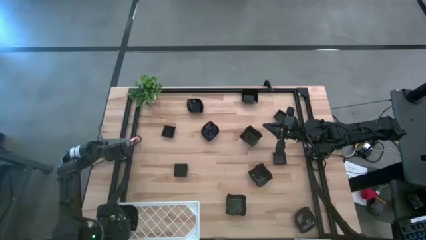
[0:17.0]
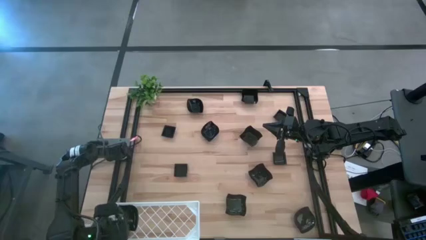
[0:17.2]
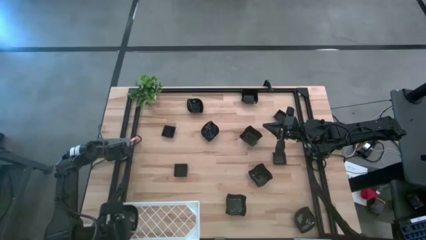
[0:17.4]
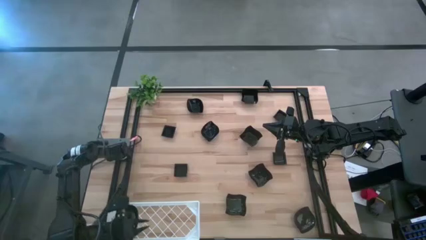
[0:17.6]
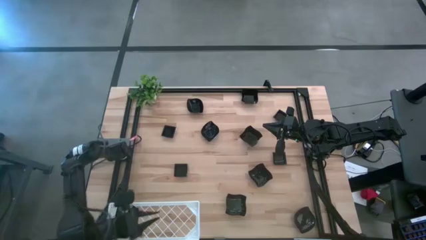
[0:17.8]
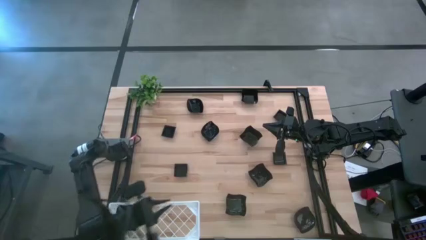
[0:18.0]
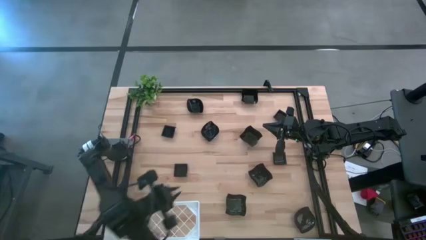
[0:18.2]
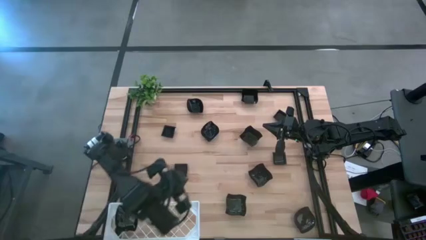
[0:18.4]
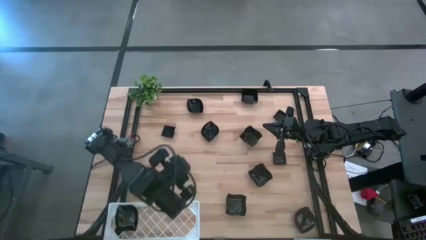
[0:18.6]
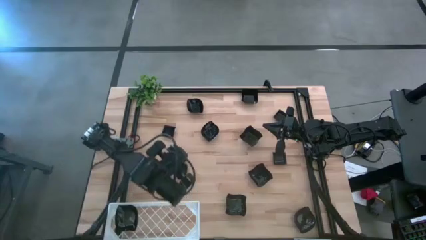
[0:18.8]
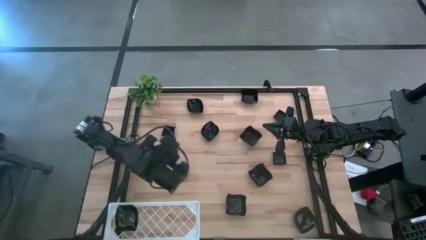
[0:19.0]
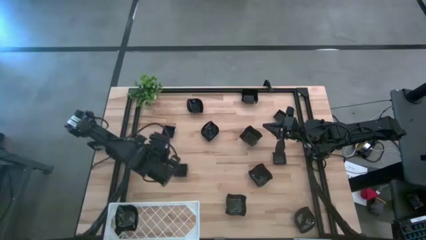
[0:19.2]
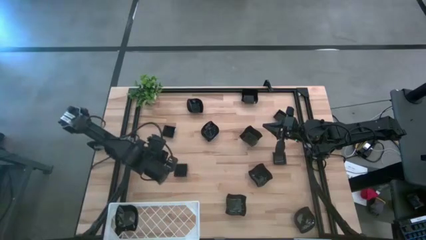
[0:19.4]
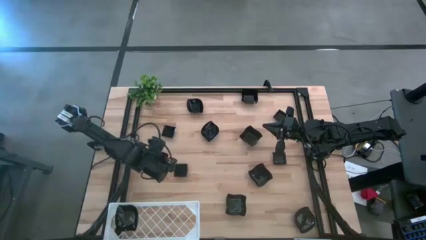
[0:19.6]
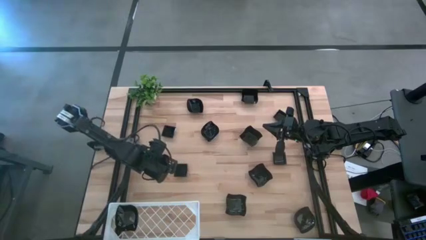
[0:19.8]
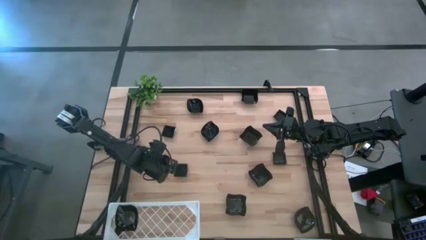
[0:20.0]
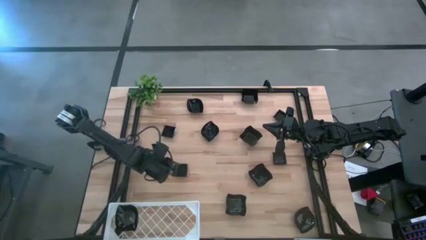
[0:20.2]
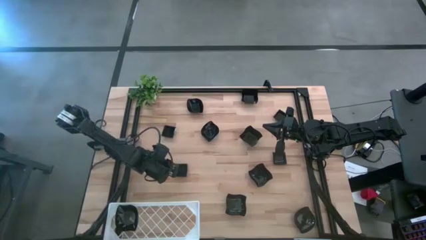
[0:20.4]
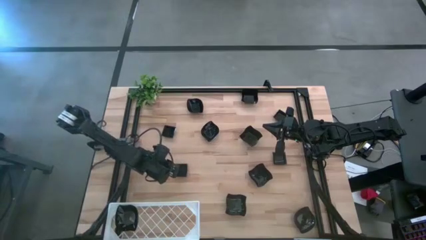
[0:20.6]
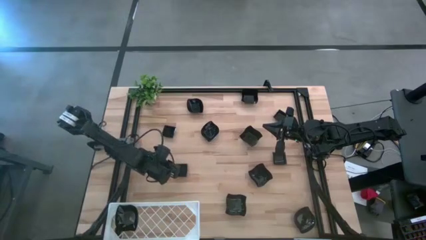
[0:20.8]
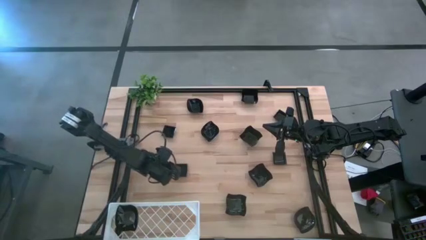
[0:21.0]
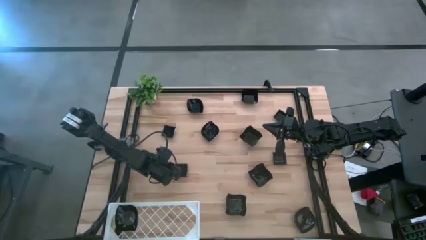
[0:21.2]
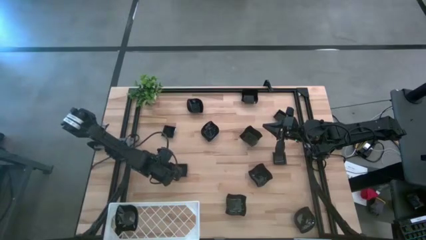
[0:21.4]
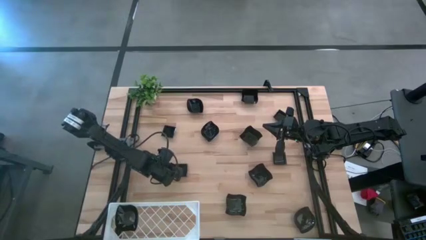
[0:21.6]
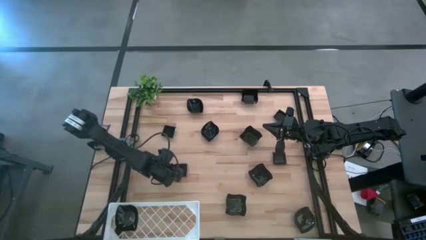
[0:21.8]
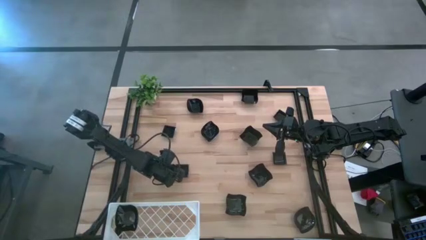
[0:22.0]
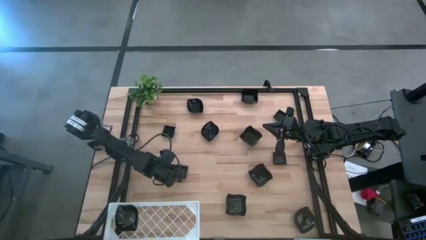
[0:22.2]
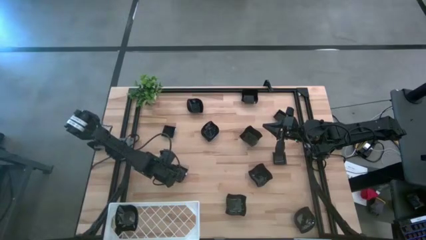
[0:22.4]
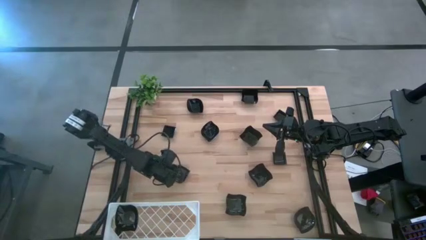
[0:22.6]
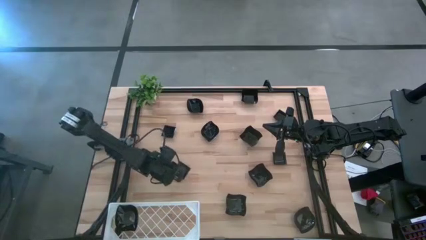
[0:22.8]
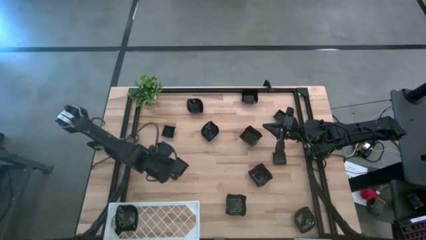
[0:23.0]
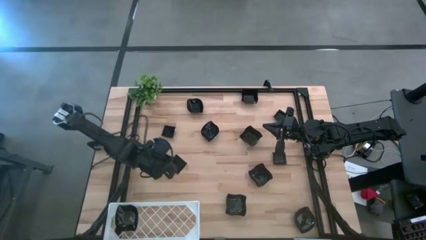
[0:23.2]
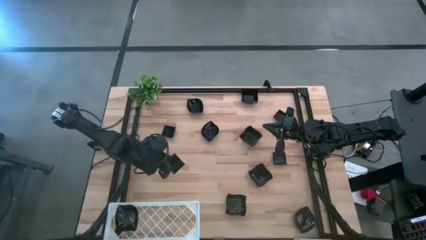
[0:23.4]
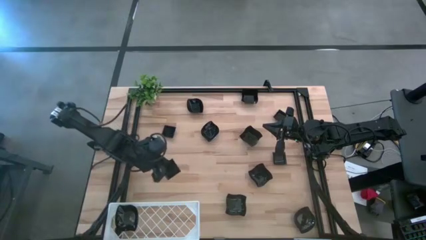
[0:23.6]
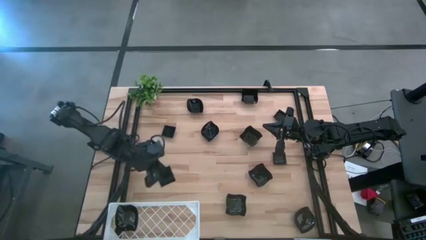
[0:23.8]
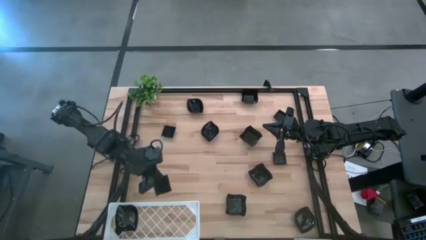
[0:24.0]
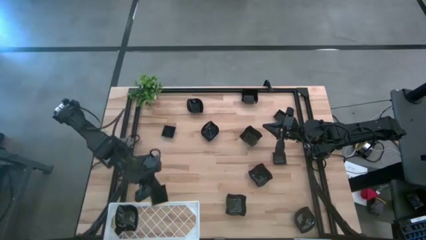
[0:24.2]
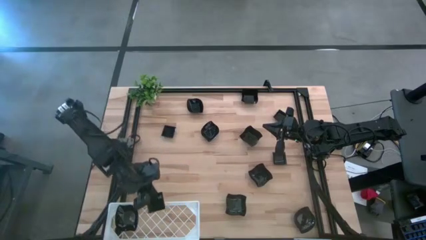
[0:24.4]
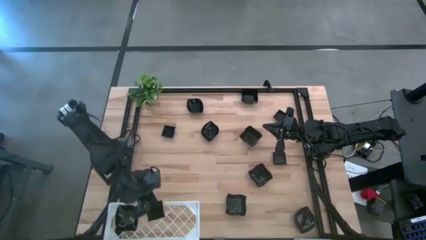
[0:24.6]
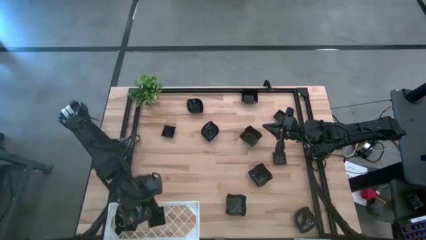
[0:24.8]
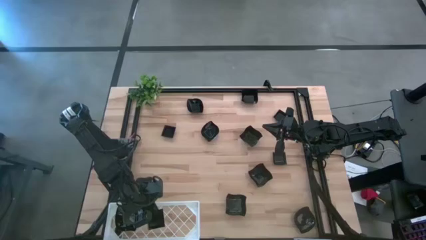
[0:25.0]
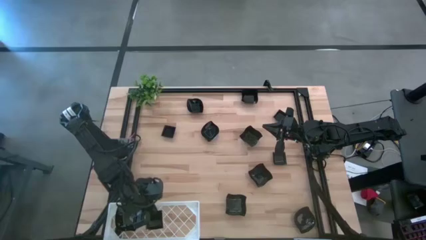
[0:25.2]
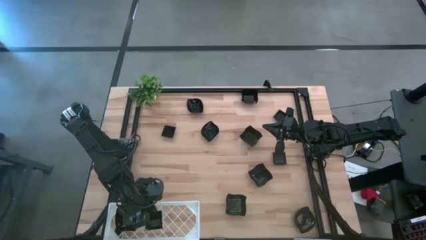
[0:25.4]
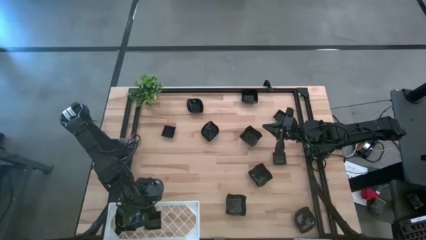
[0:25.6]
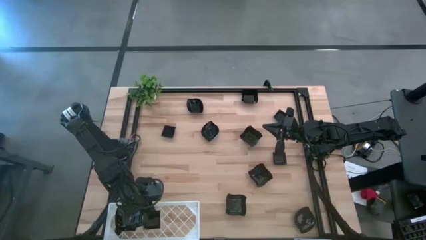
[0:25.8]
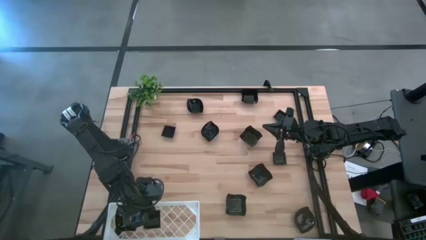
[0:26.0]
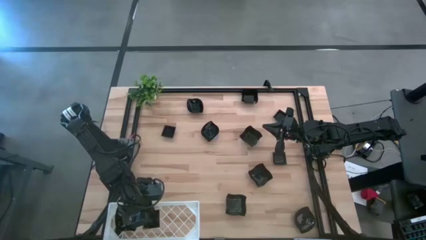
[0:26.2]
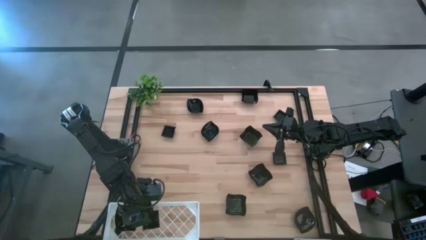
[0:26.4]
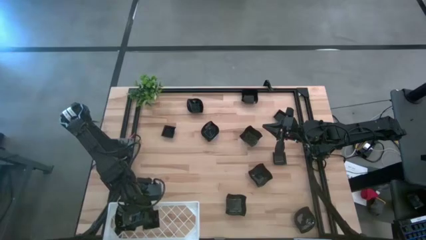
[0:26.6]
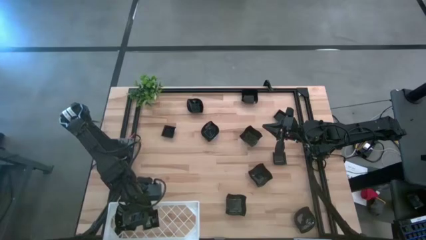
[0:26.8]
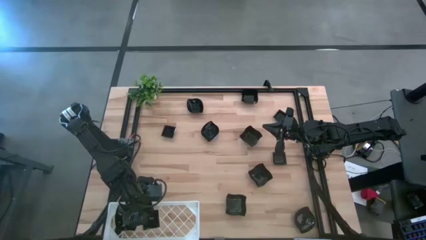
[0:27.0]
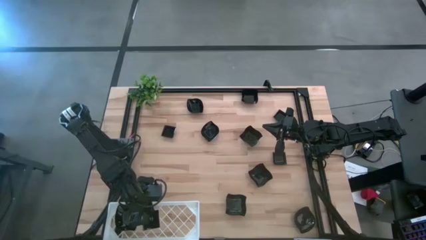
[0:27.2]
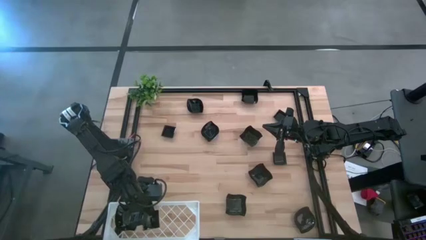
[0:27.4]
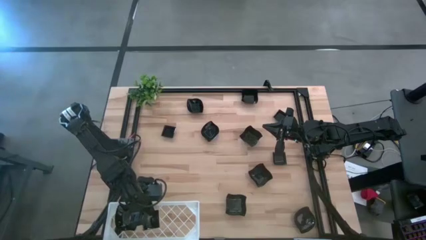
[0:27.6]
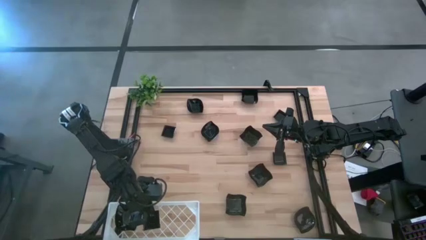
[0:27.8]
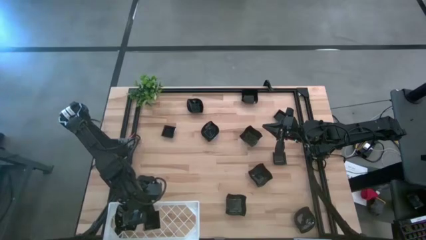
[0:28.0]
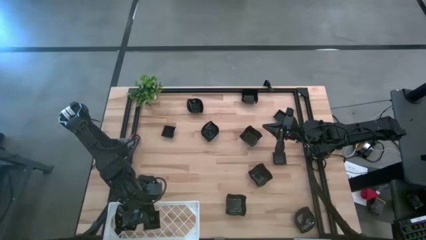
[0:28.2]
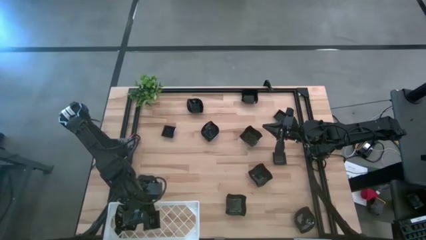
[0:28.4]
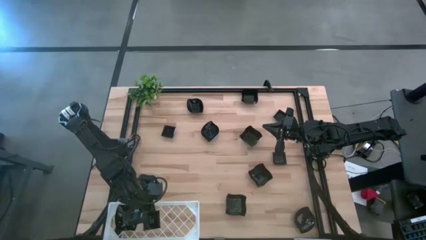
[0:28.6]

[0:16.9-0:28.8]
Task: Pick & Place Mini shaped plates
Put the black square plate on the shelf
